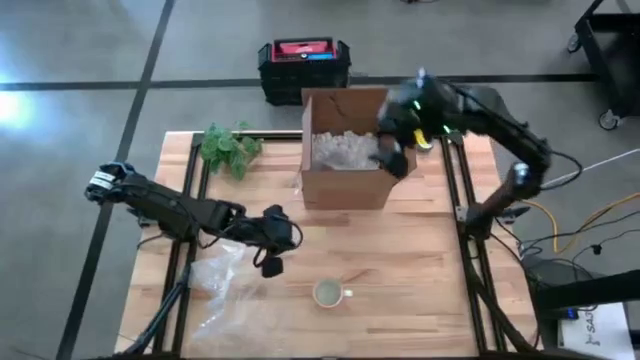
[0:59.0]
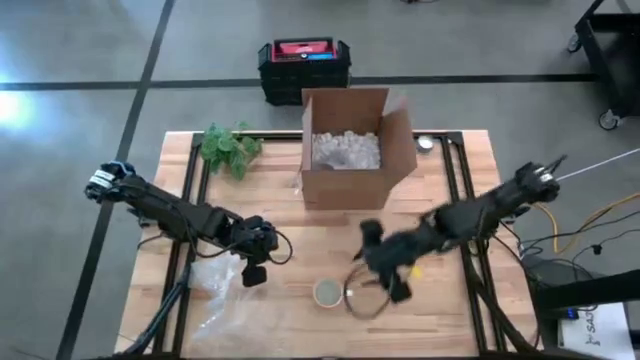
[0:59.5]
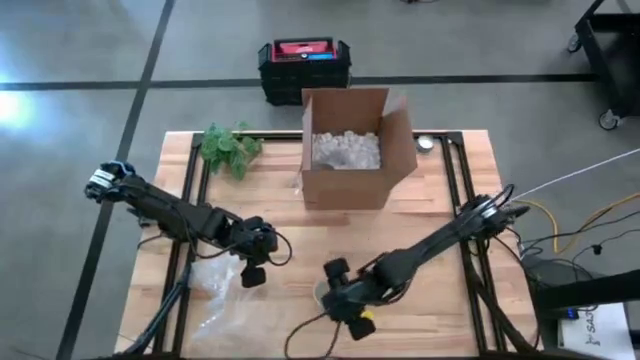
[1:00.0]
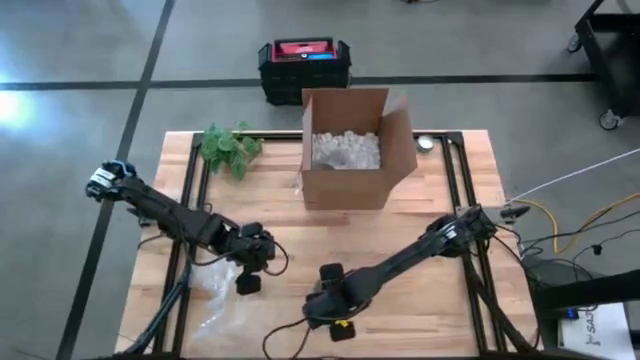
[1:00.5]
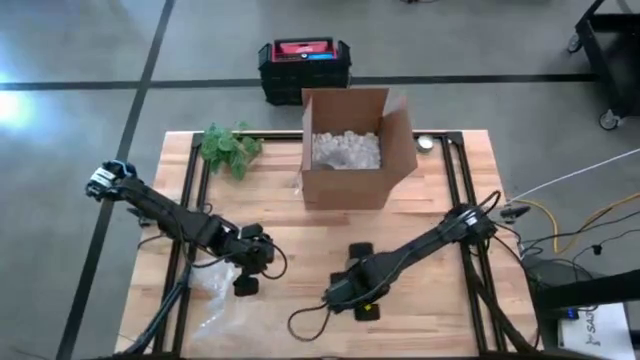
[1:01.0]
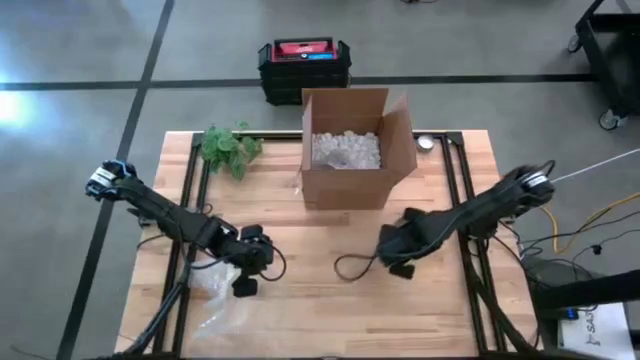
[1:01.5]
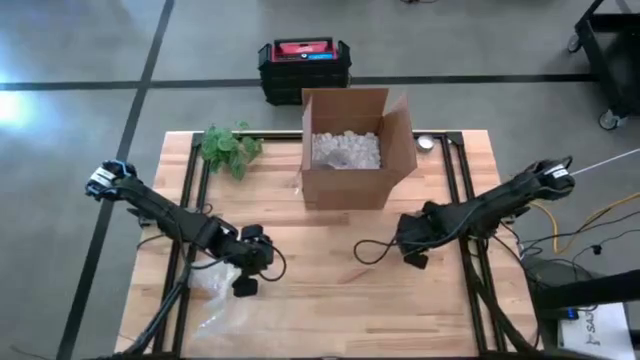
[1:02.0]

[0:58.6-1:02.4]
Task: wrap mug
Move the yellow mug to the middle right of the table

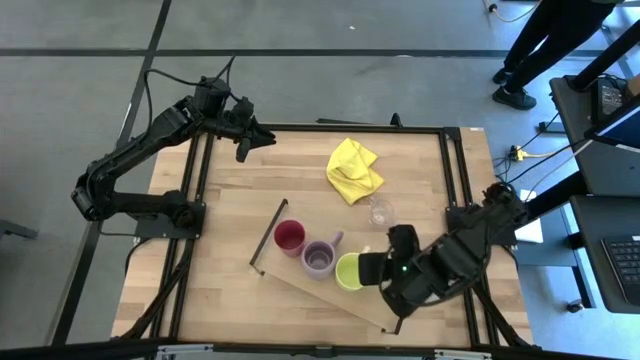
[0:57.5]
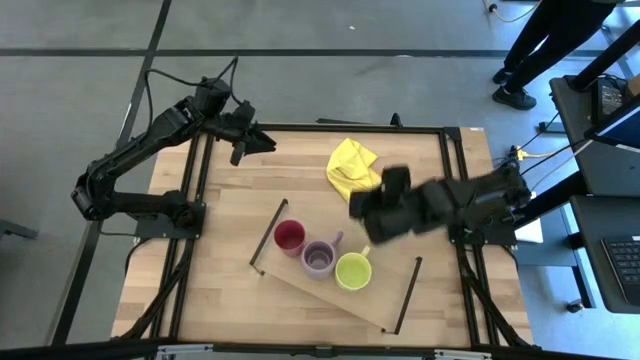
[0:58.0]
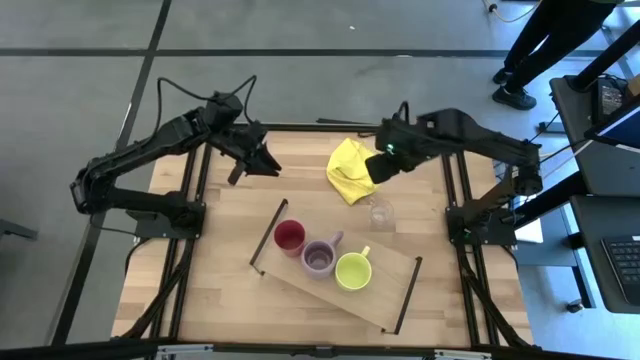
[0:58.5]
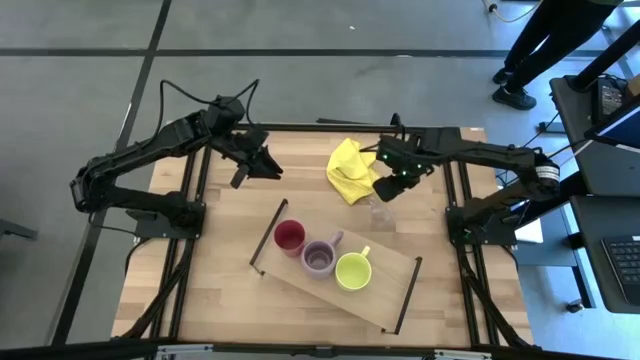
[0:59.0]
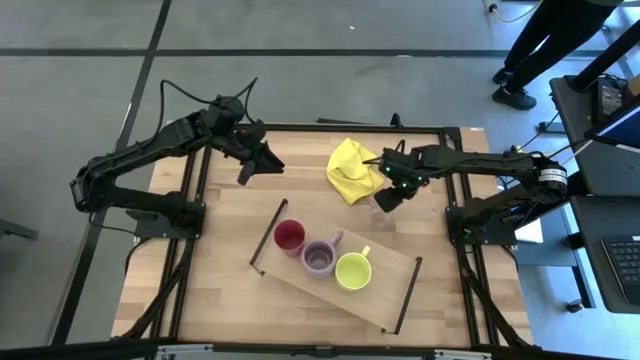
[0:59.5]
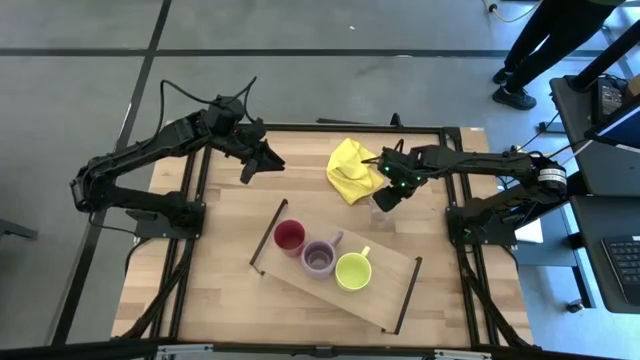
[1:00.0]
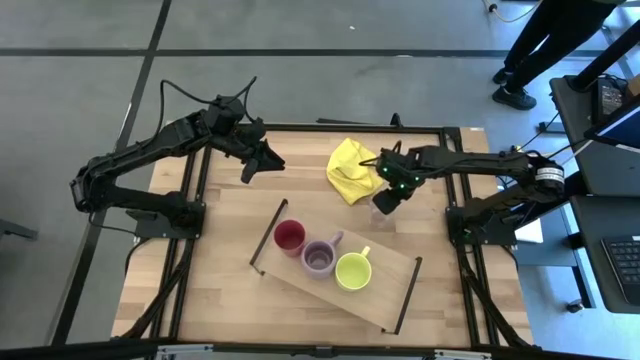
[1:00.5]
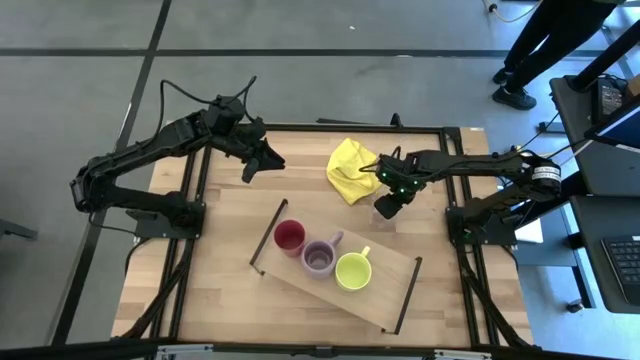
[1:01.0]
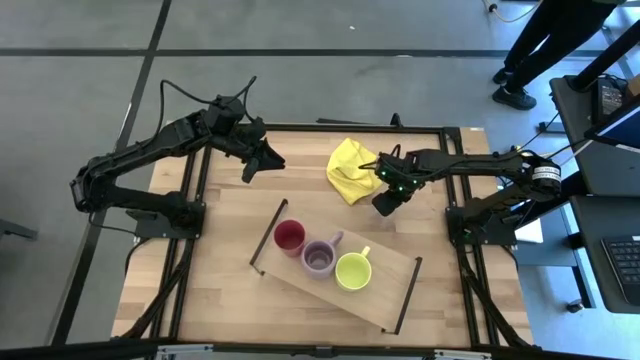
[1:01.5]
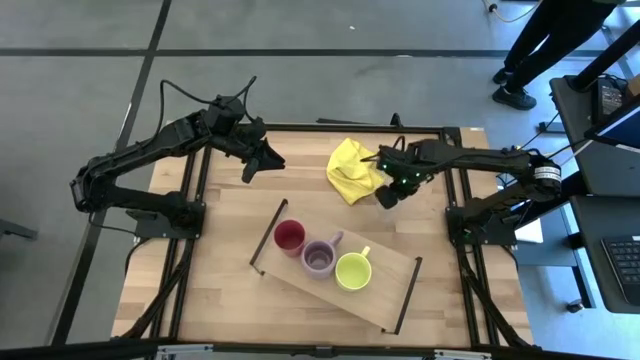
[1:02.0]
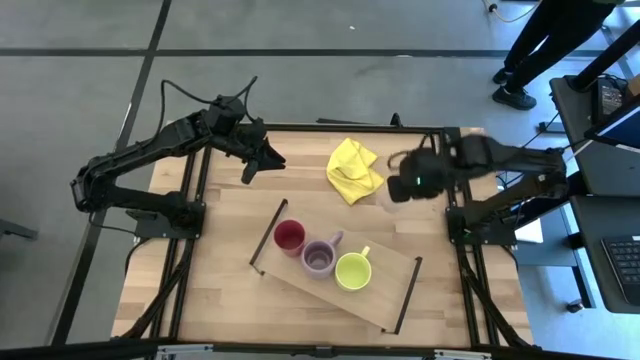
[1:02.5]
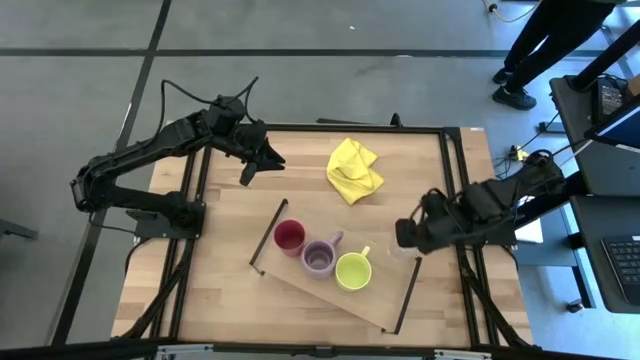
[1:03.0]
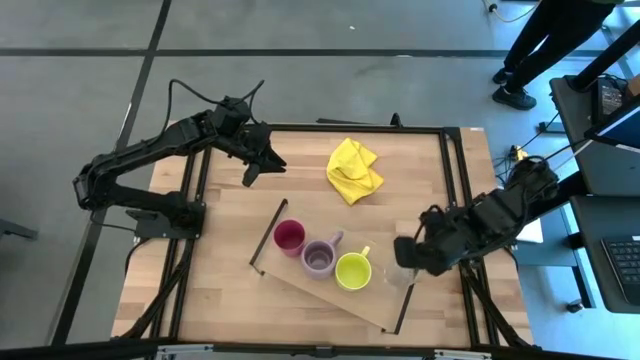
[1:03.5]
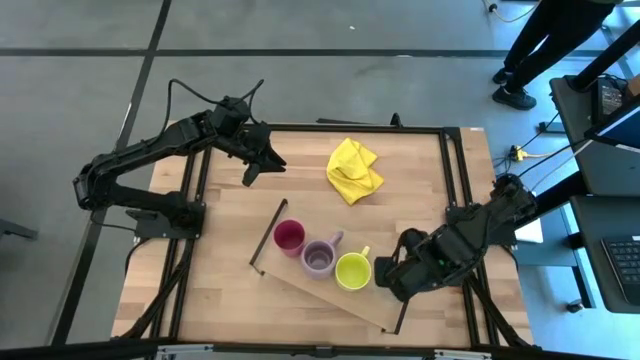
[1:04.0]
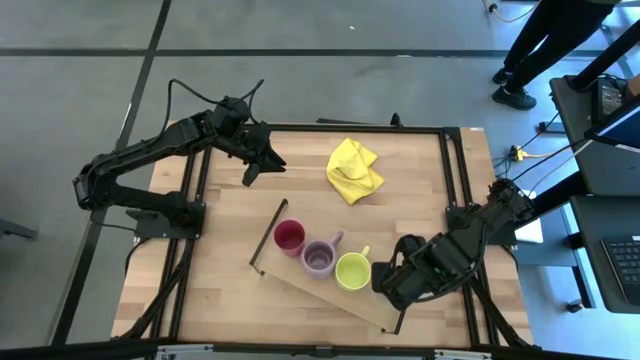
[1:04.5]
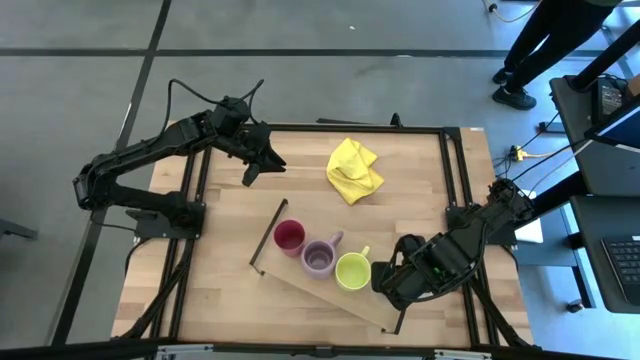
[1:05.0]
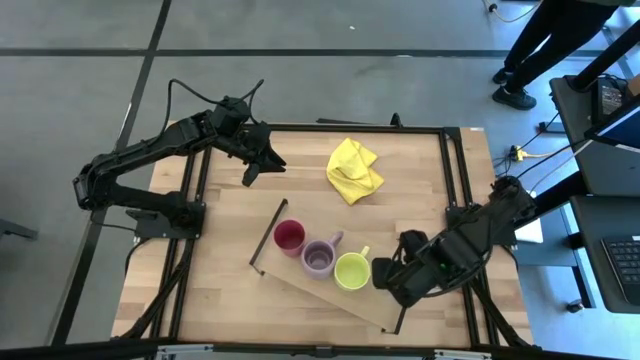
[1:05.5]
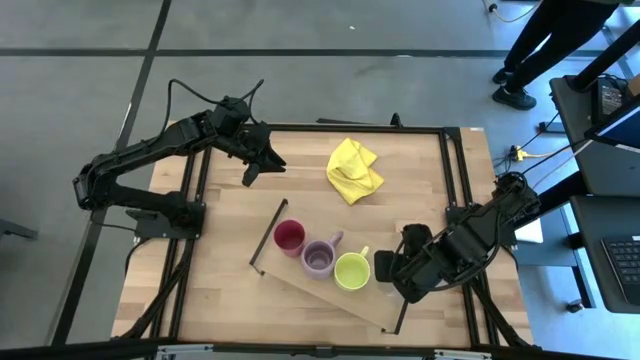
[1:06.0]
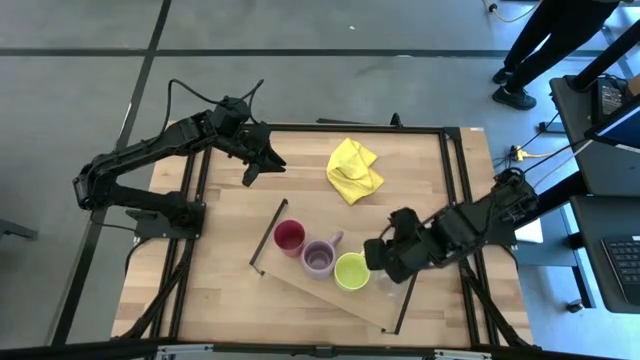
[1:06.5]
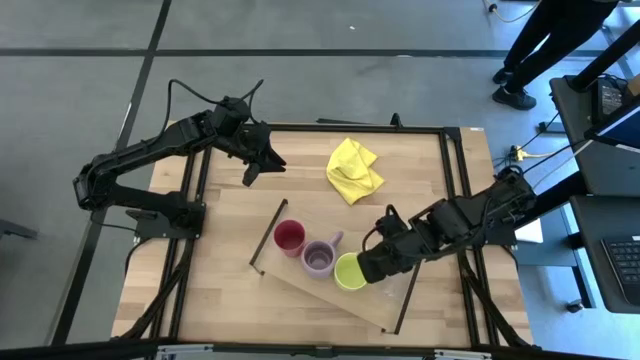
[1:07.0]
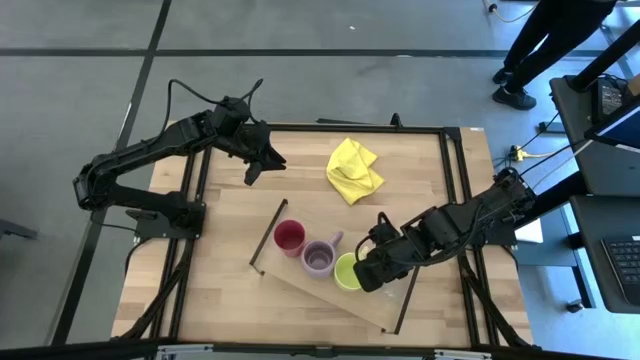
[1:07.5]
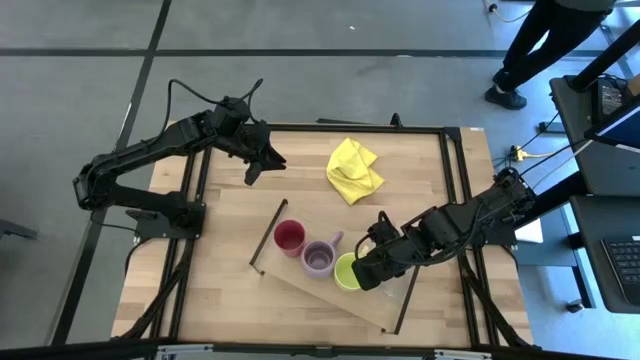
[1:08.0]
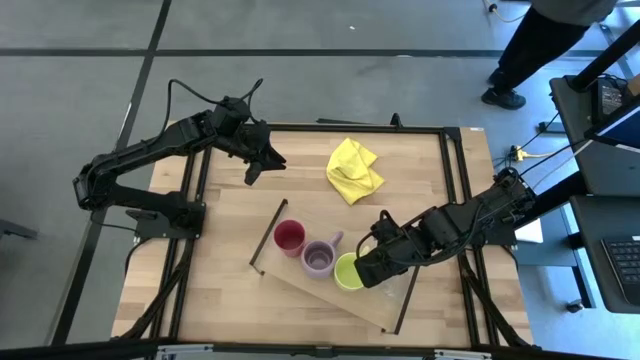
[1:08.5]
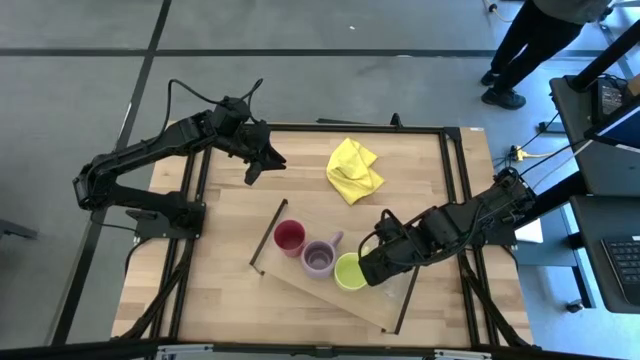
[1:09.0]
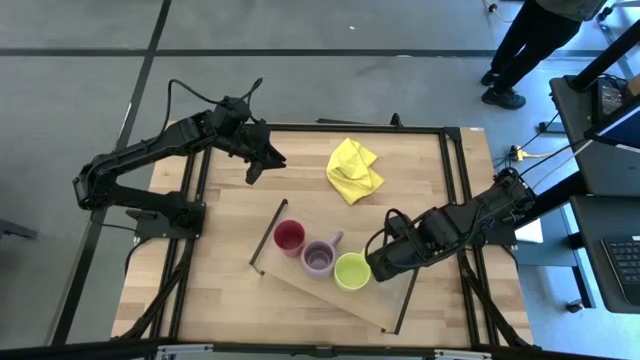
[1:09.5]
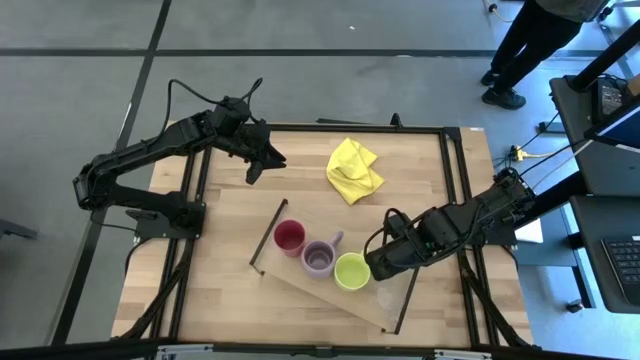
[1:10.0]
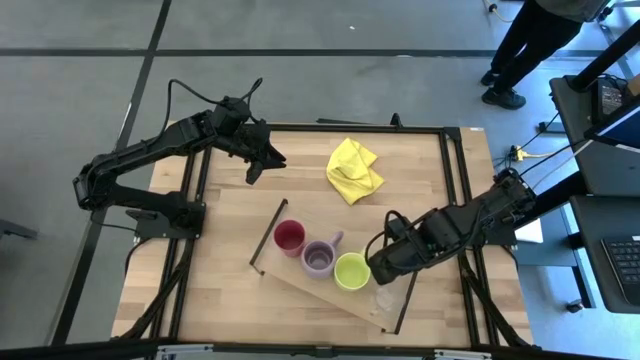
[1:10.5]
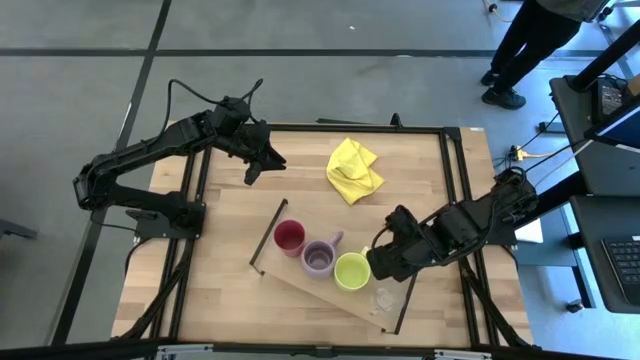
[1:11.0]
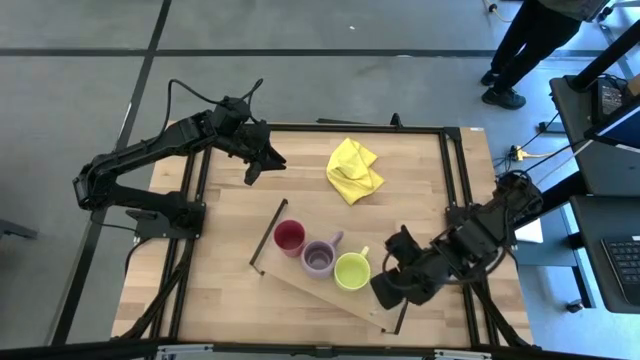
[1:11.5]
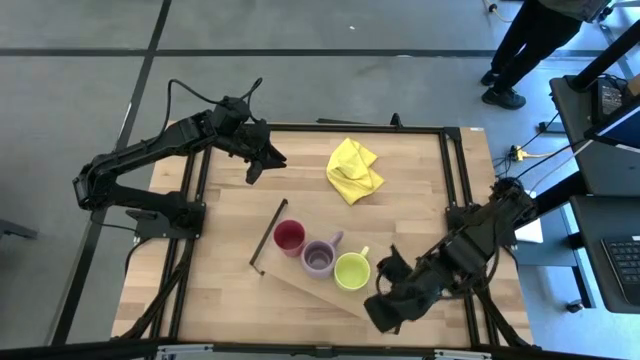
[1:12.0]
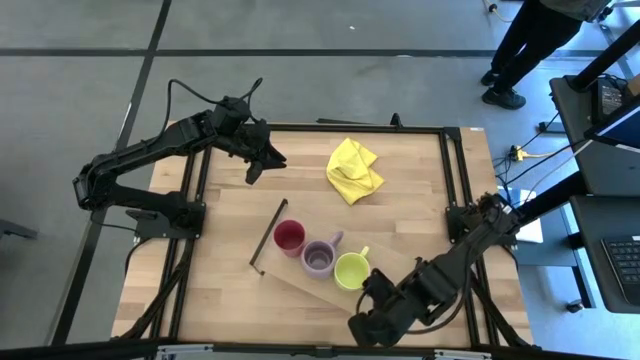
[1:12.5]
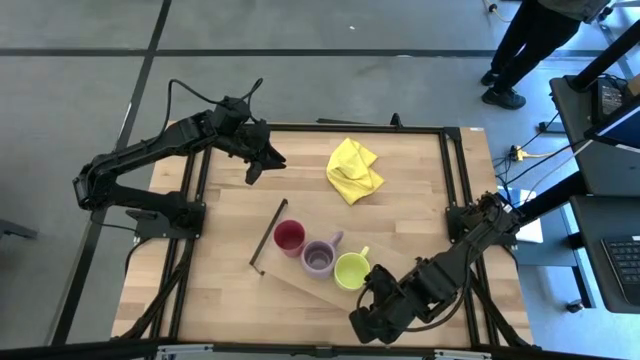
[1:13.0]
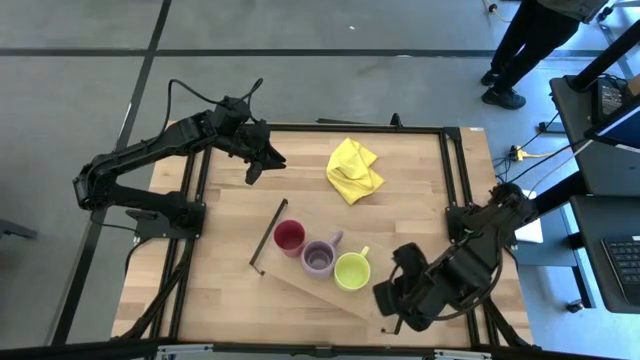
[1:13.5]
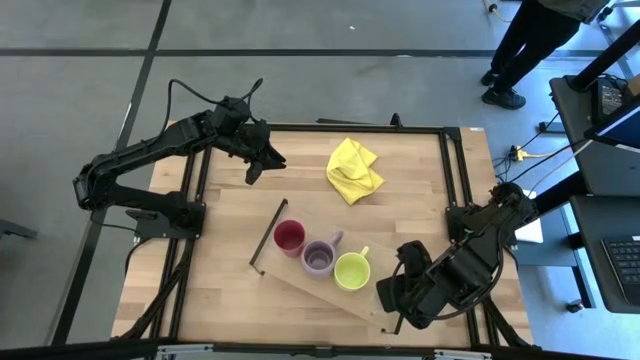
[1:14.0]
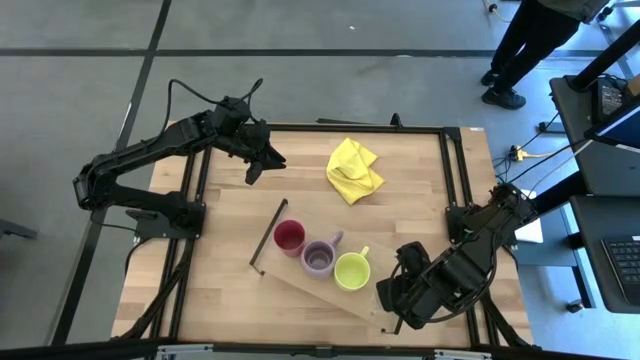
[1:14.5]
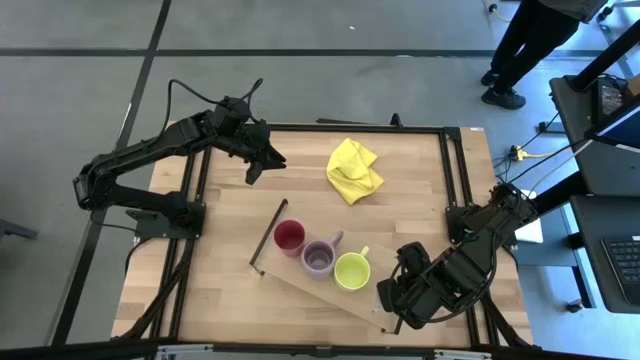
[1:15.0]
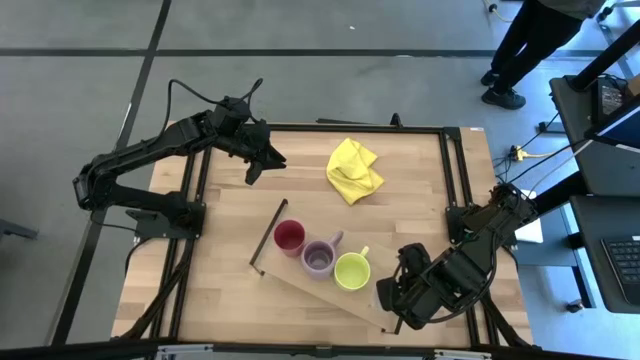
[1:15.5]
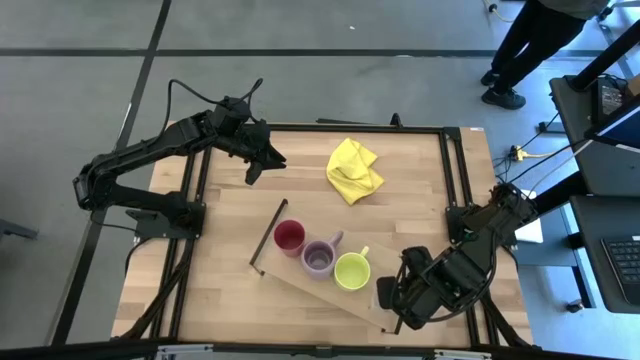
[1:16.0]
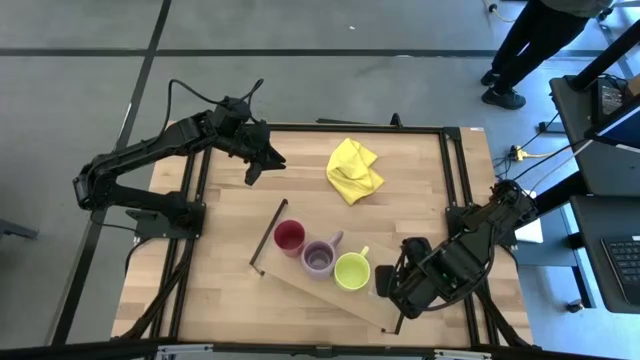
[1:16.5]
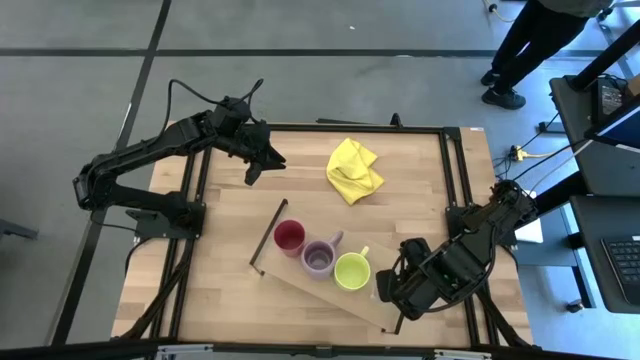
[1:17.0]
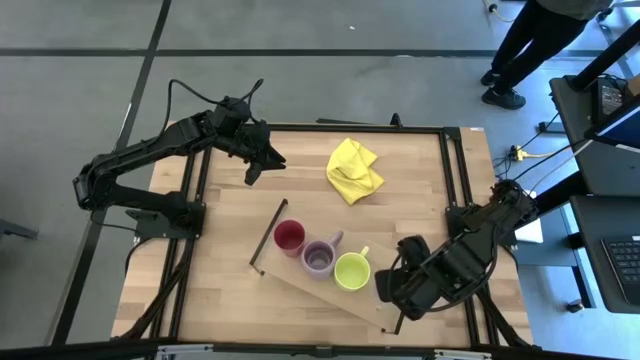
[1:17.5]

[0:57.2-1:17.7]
Task: Stack small to large cups/mugs on shelf
Put the transparent mug on the shelf
